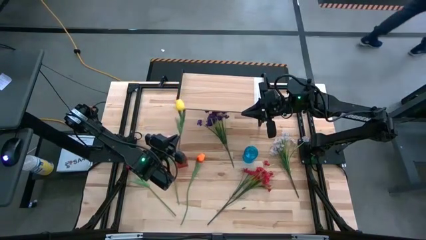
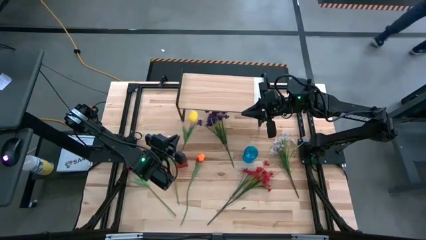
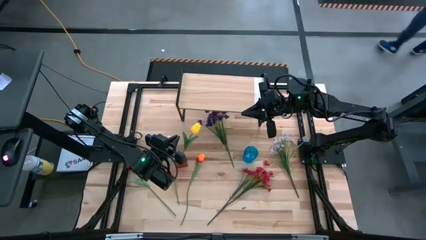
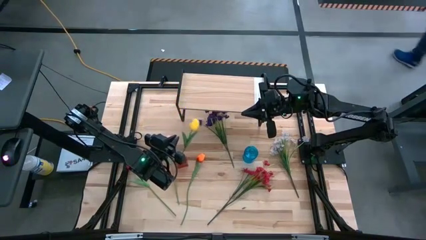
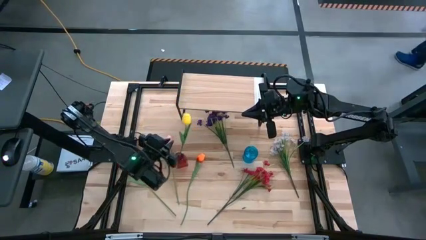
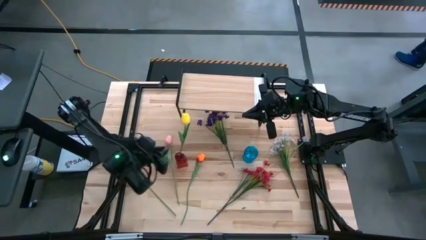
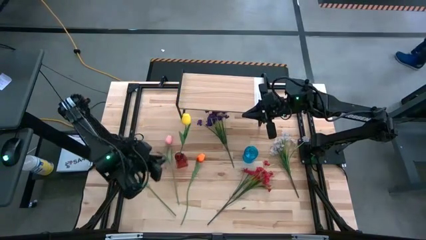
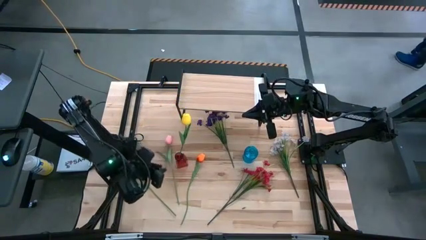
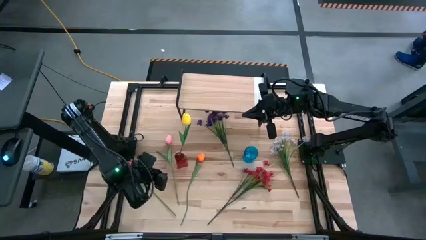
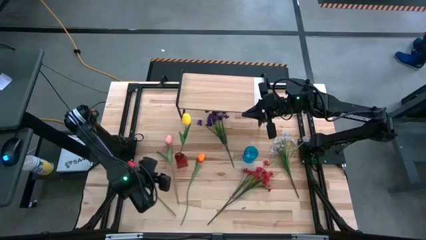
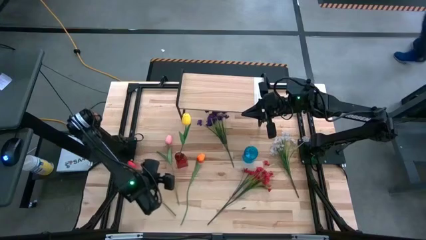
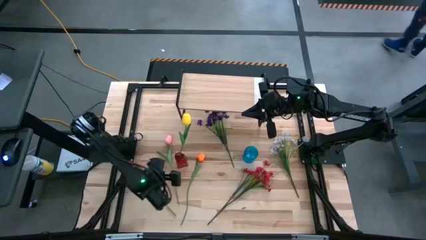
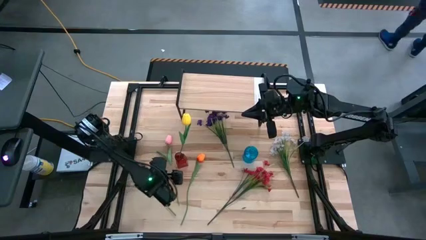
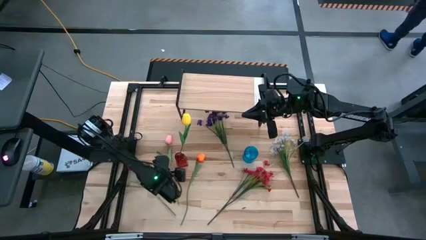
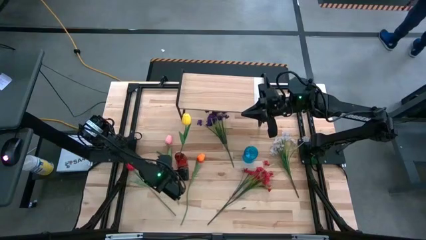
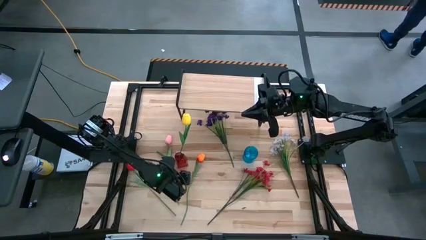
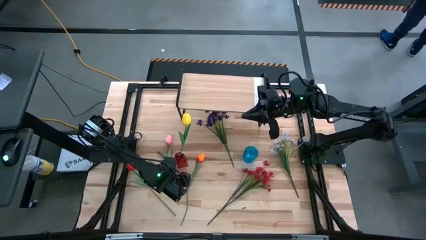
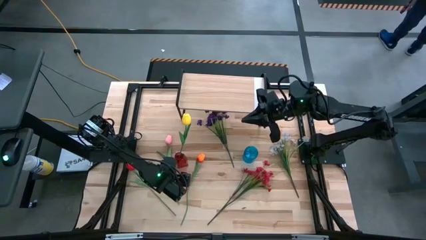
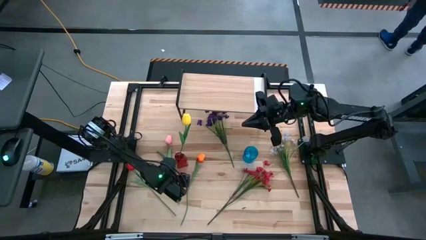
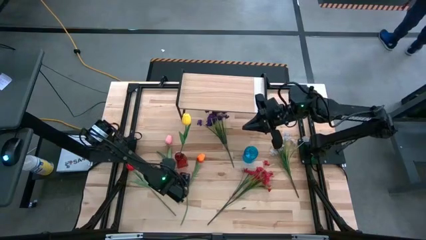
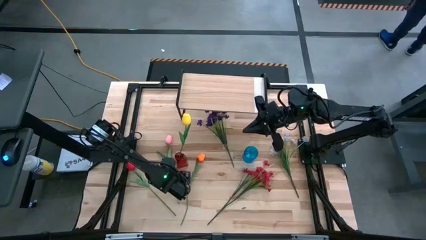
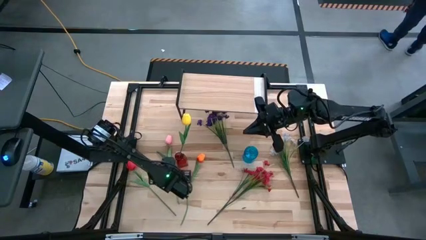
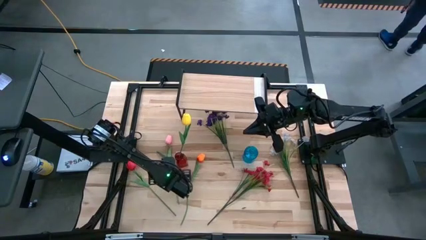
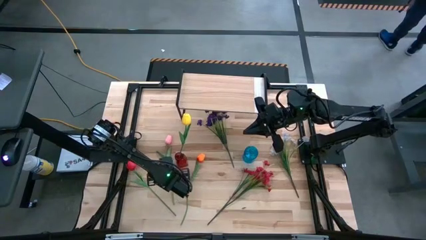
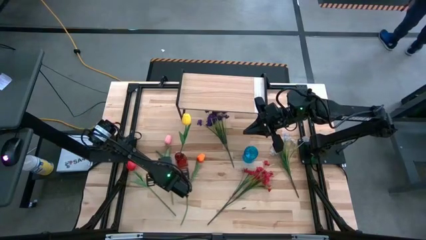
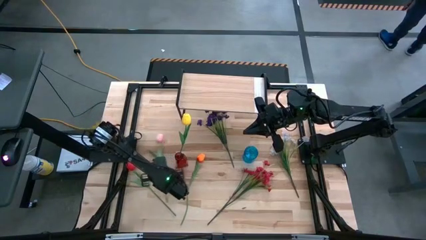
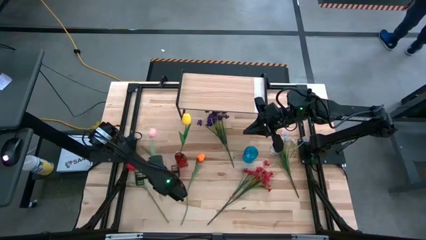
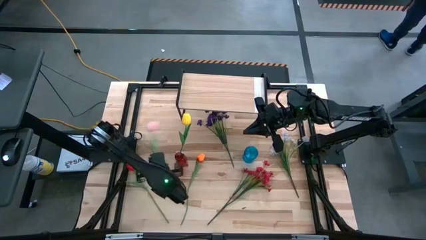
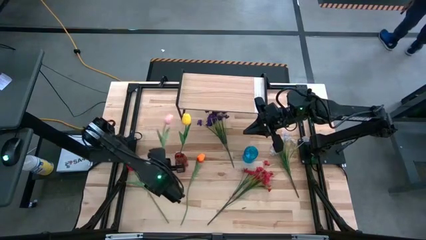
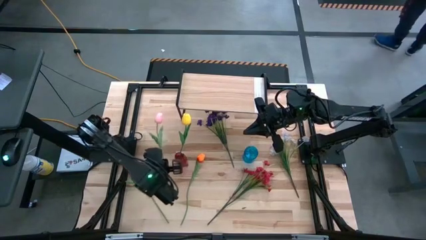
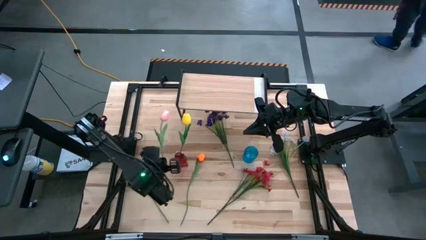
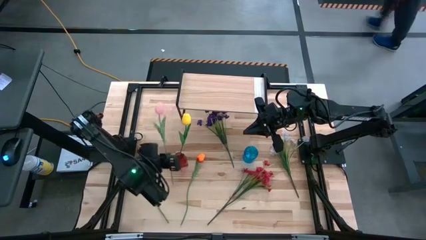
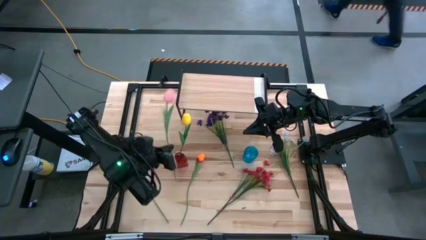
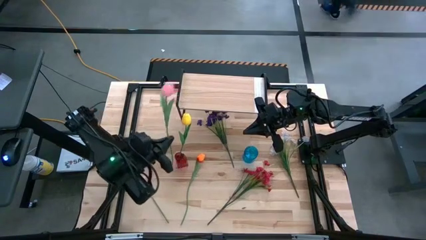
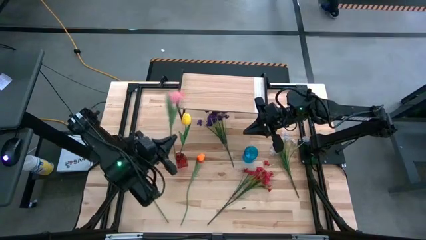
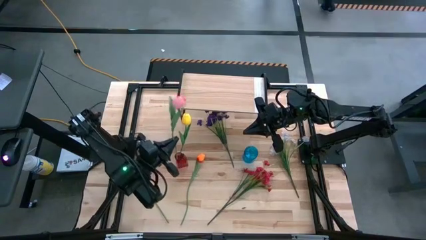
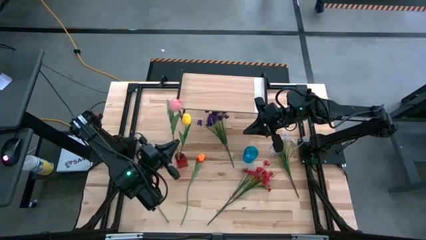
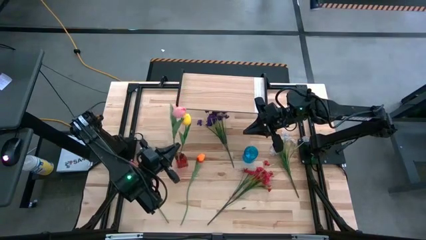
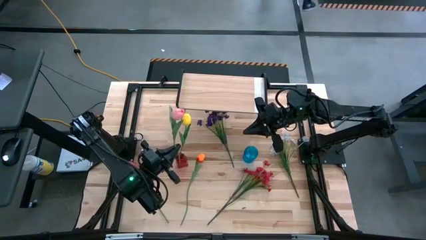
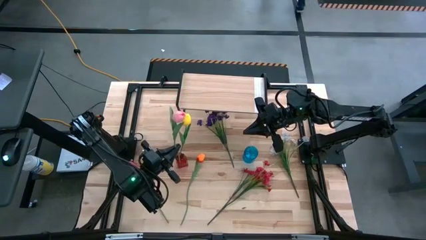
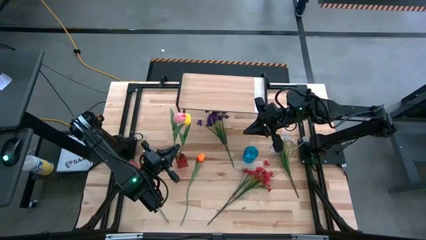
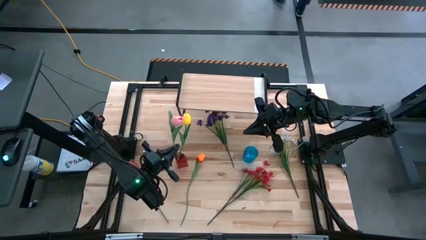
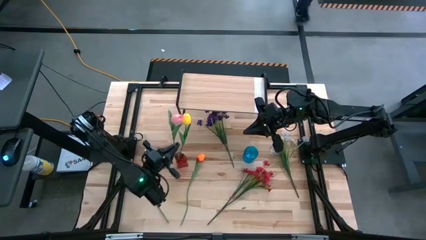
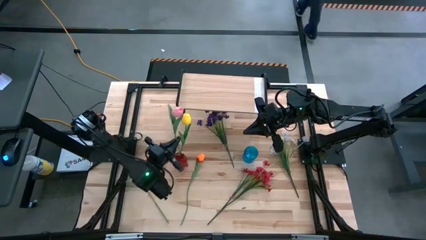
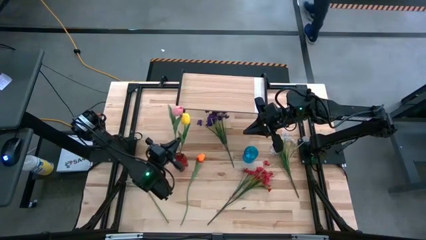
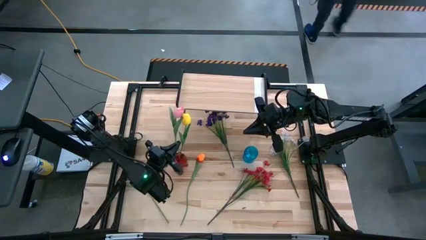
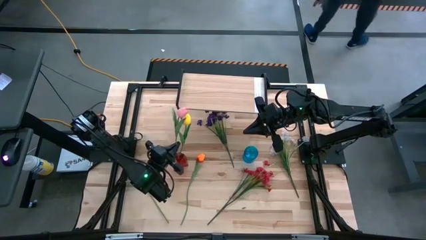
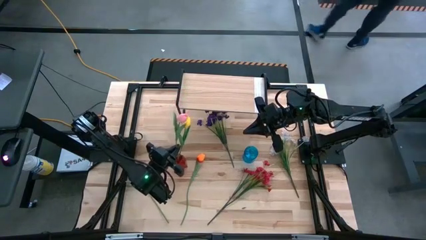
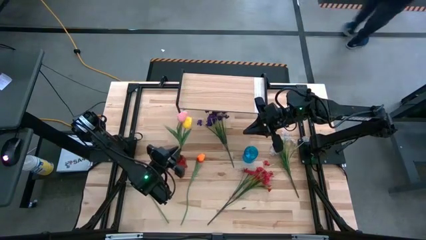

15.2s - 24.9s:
Task: Pick and place flowers into a vace then onto a shelf
Put the pink flower into the red vase

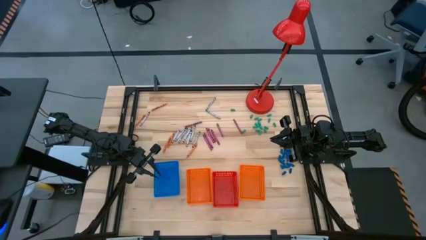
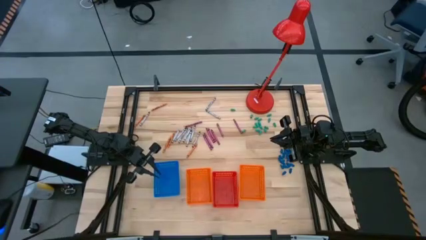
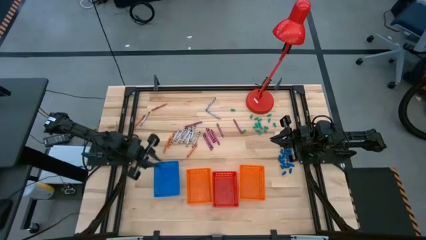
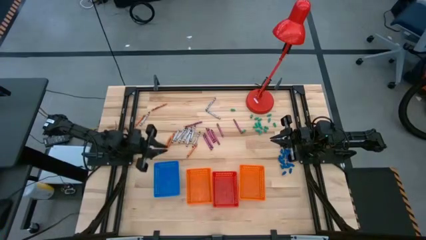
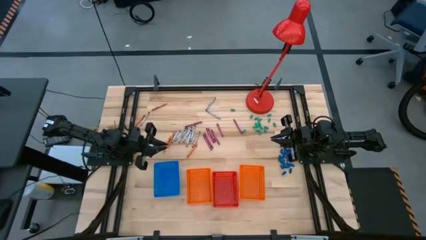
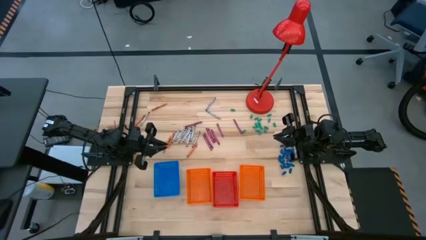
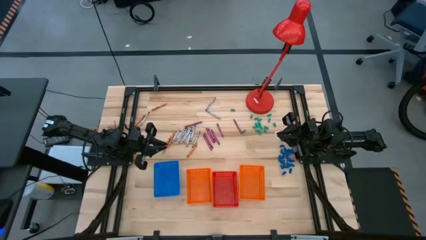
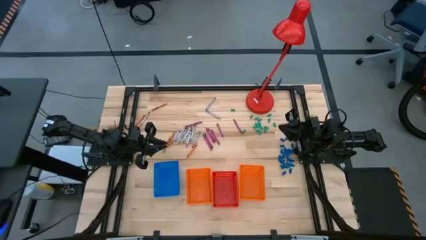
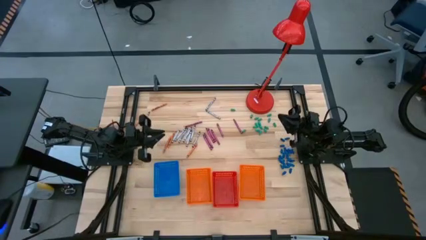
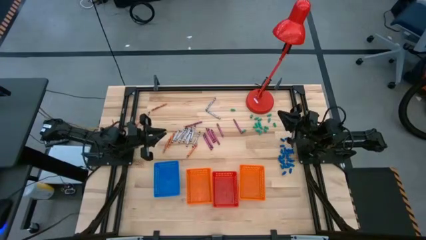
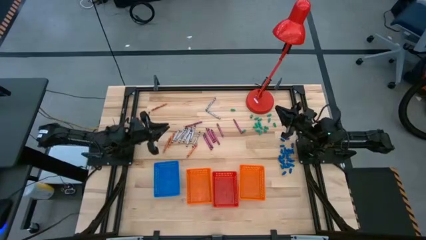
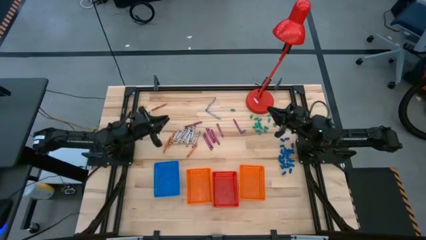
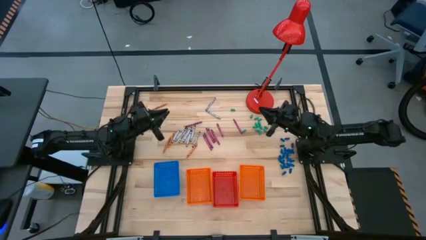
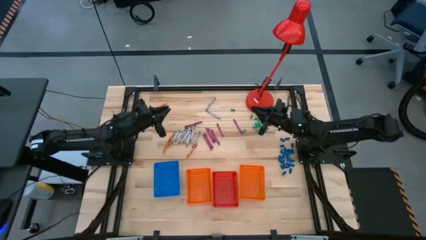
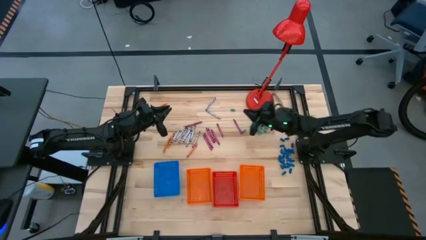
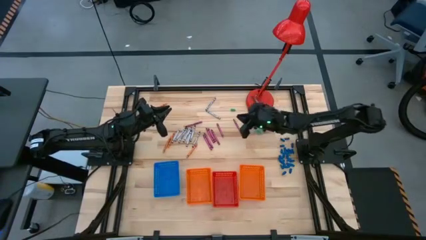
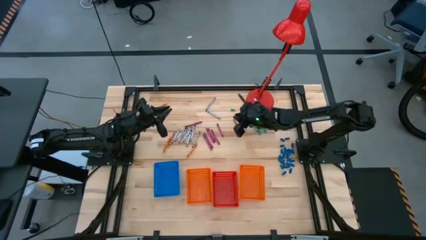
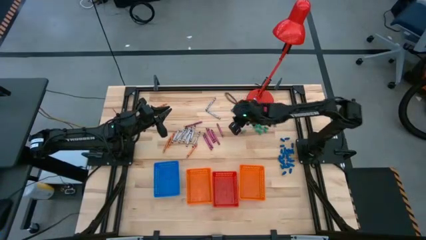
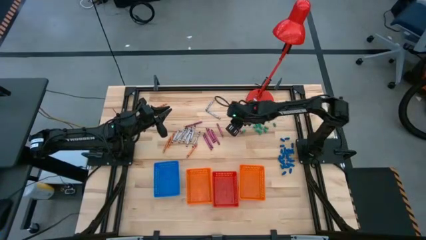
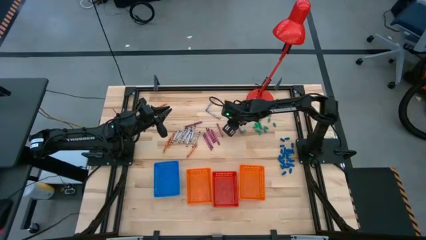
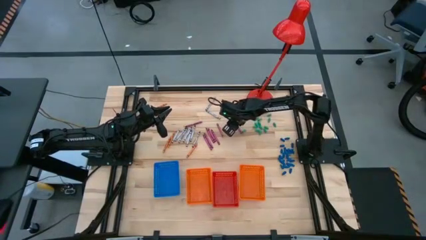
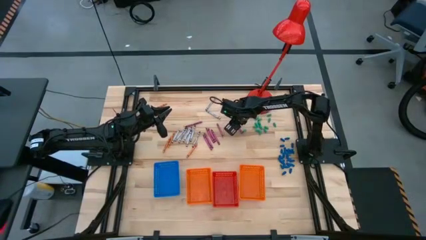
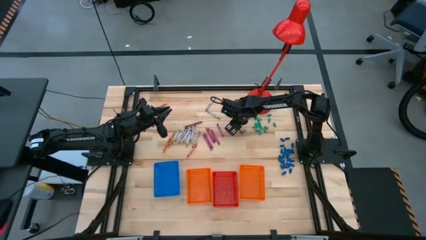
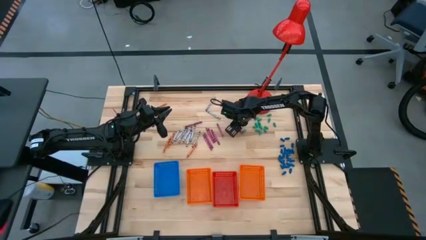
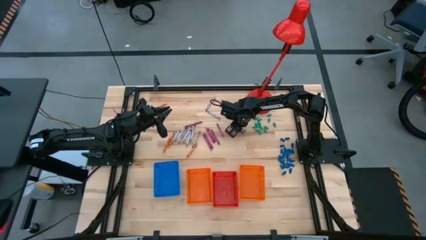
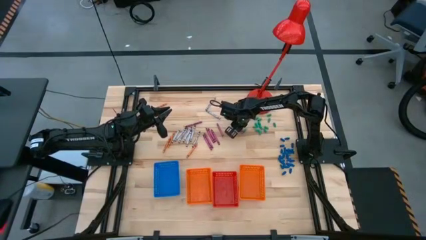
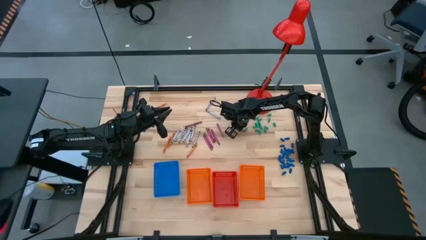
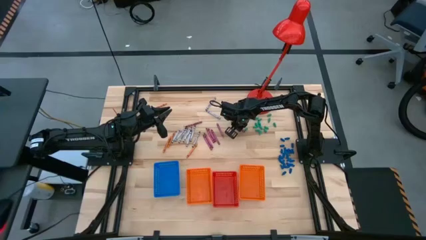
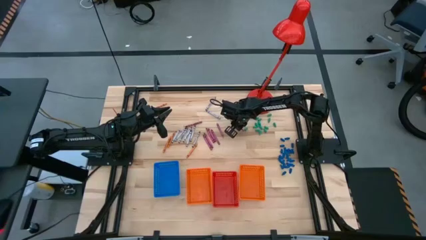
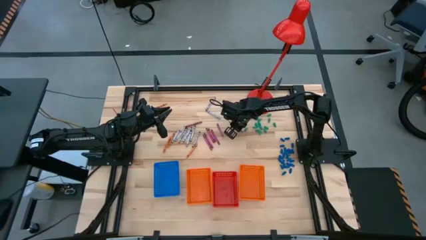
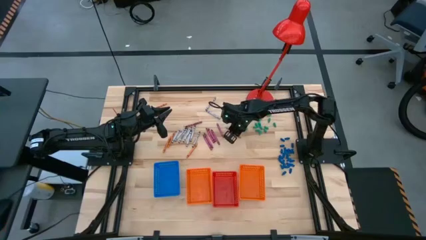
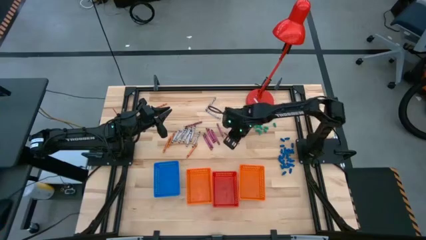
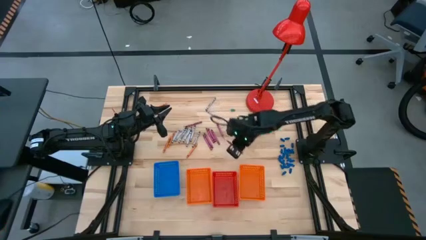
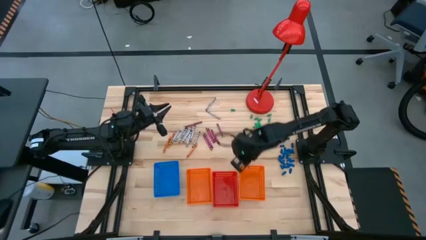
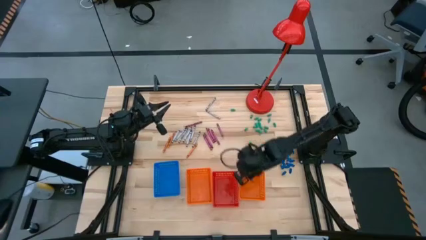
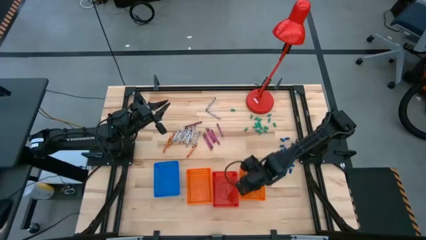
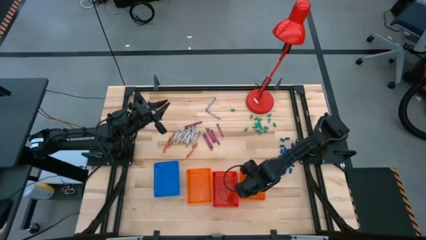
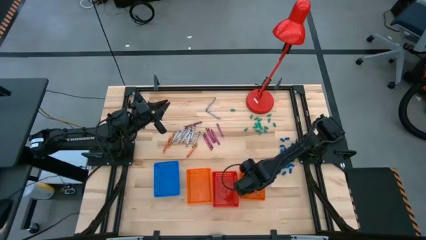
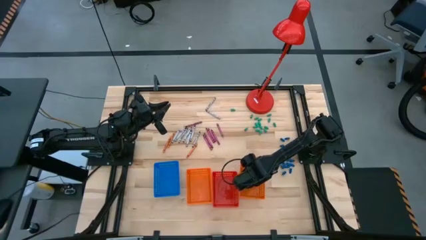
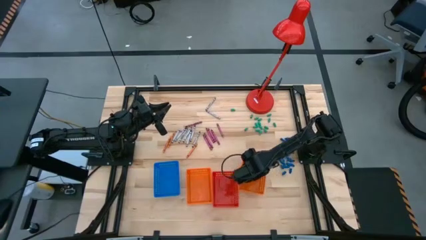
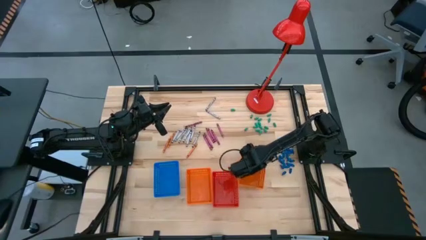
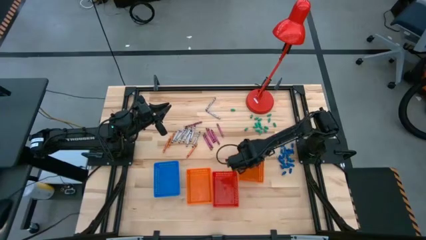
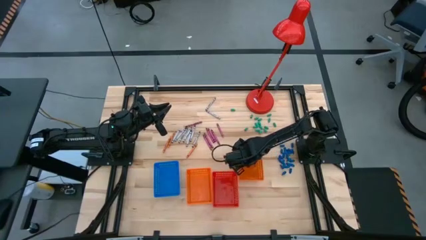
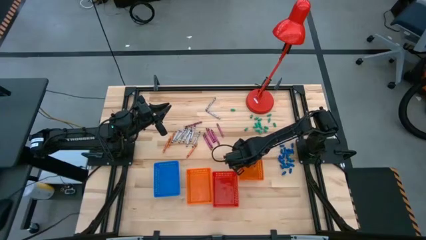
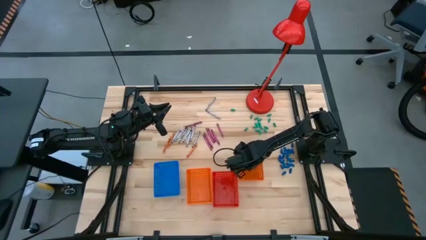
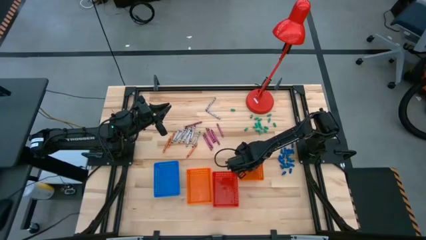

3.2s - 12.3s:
Task: Sort crayons
Put the red crayon into the right orange bin
